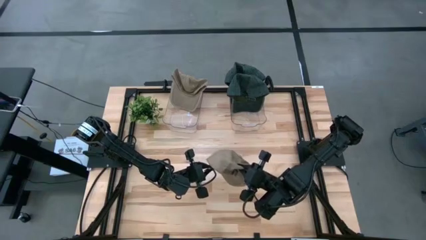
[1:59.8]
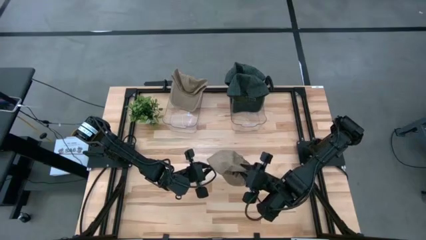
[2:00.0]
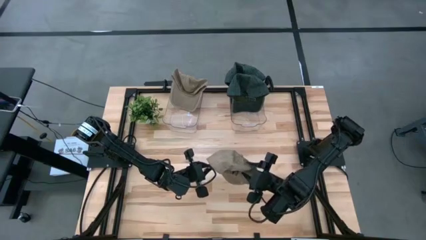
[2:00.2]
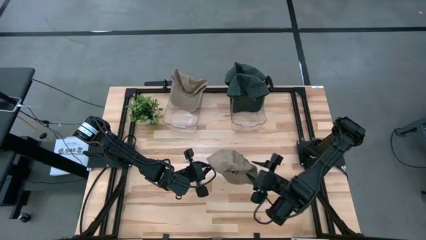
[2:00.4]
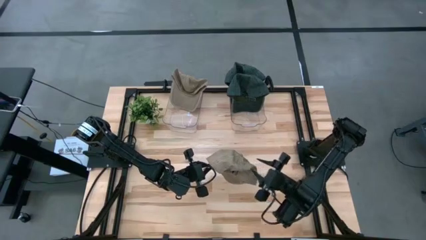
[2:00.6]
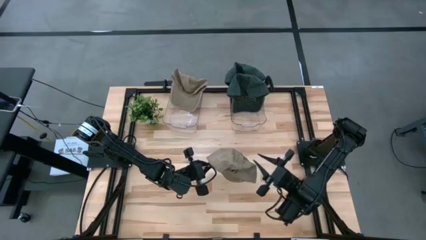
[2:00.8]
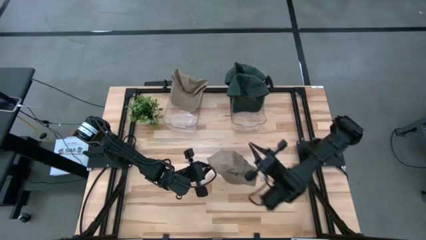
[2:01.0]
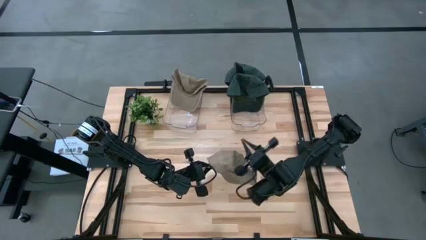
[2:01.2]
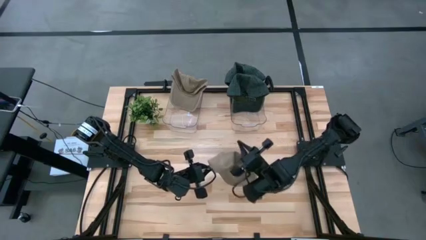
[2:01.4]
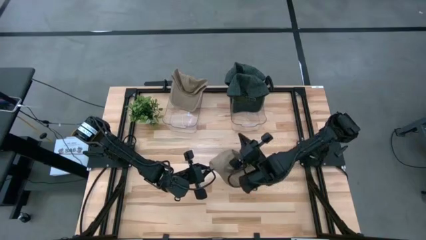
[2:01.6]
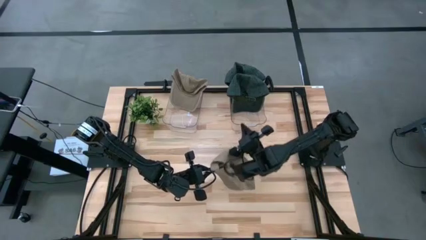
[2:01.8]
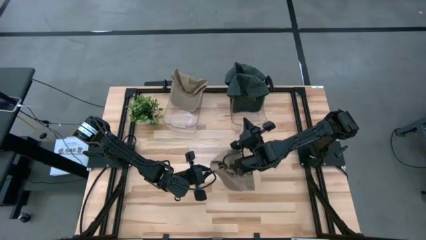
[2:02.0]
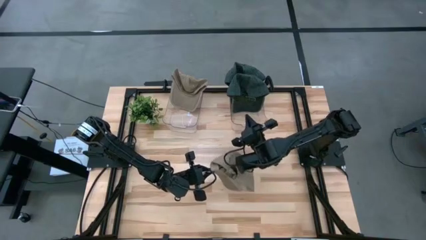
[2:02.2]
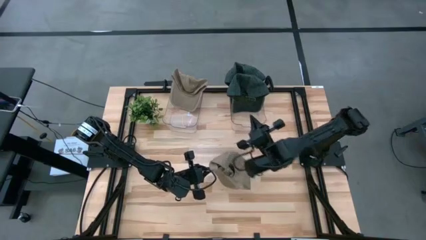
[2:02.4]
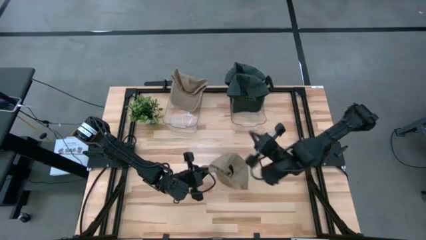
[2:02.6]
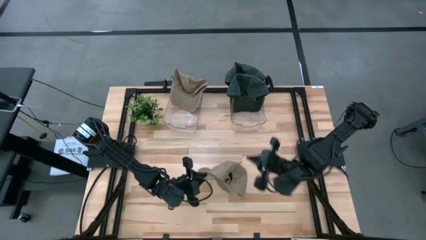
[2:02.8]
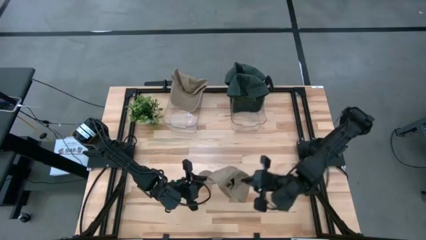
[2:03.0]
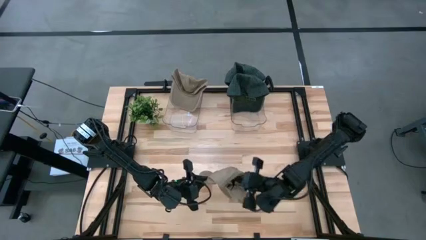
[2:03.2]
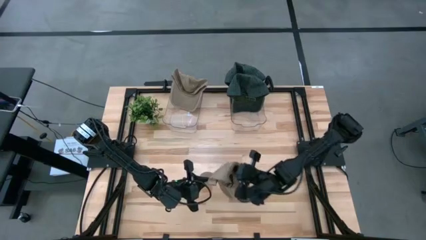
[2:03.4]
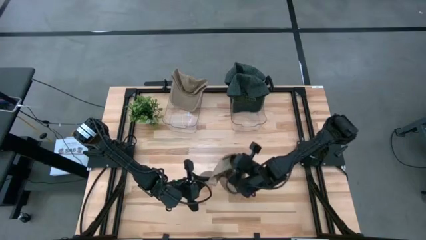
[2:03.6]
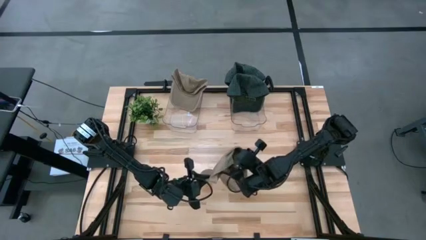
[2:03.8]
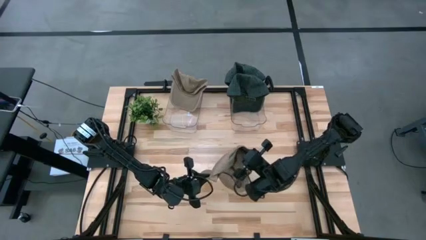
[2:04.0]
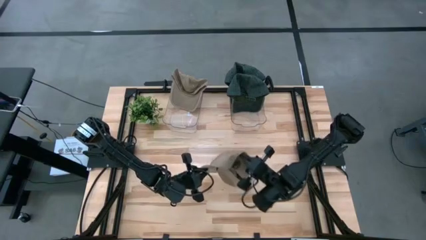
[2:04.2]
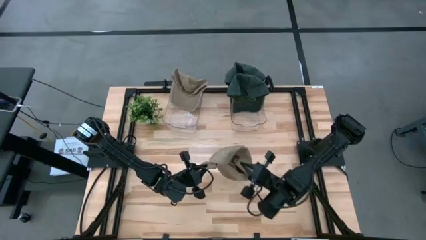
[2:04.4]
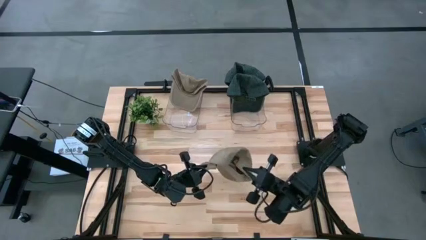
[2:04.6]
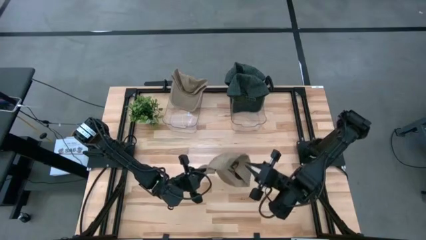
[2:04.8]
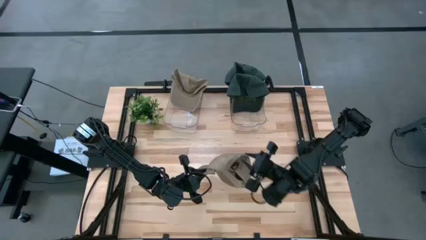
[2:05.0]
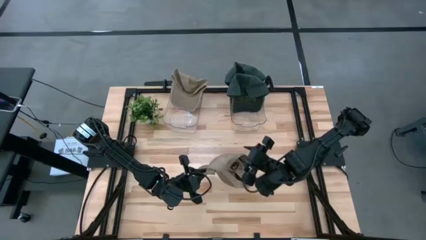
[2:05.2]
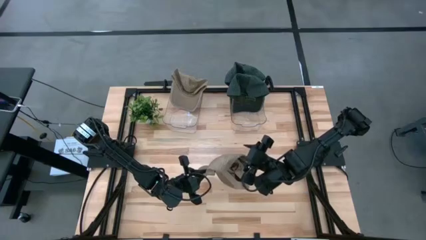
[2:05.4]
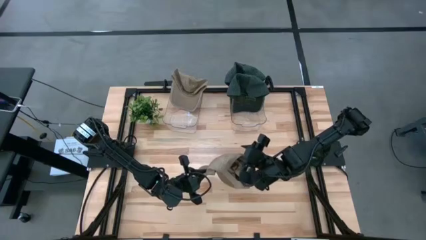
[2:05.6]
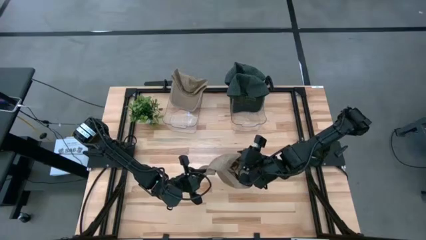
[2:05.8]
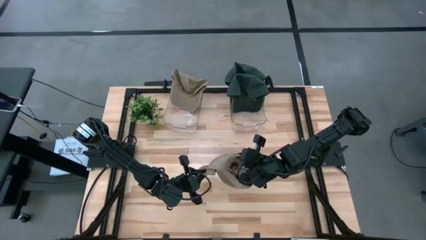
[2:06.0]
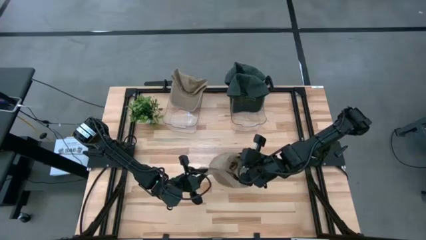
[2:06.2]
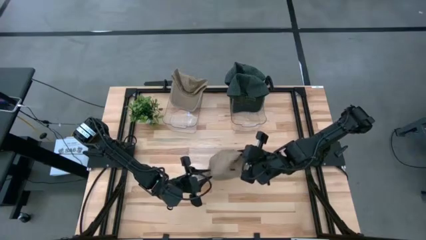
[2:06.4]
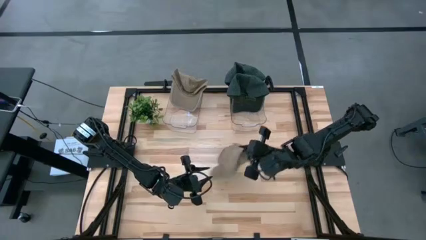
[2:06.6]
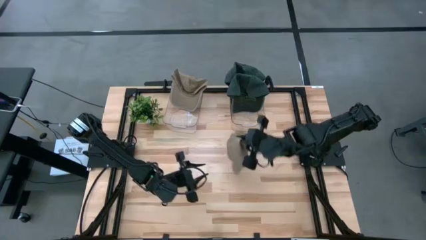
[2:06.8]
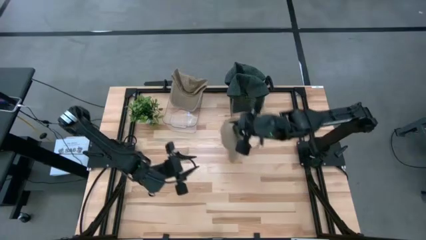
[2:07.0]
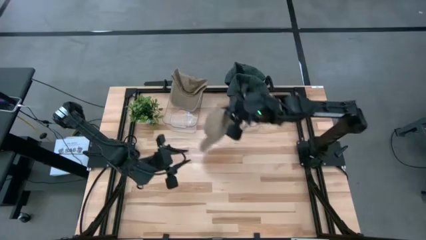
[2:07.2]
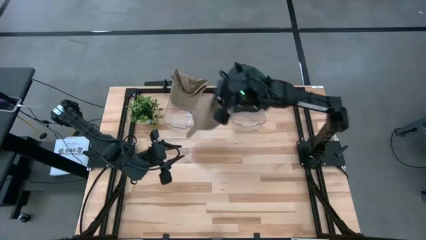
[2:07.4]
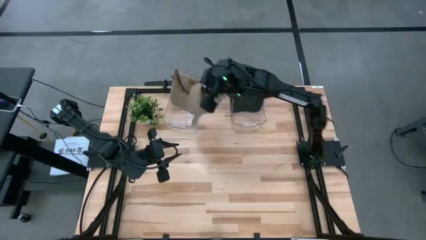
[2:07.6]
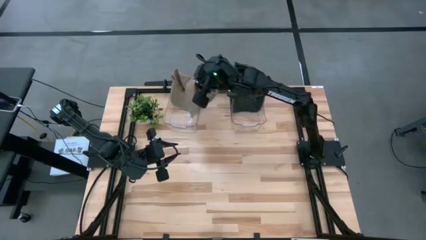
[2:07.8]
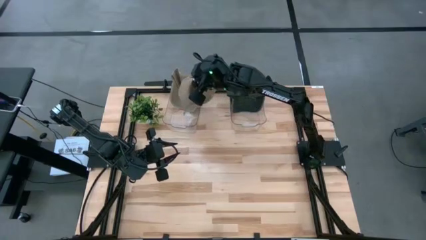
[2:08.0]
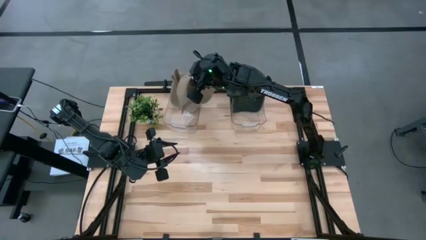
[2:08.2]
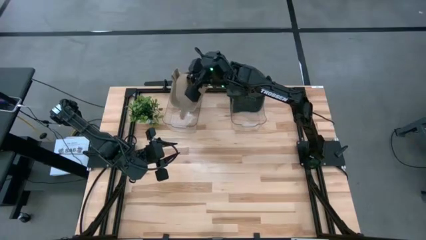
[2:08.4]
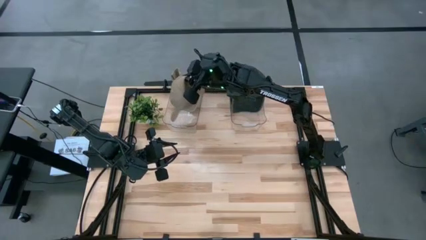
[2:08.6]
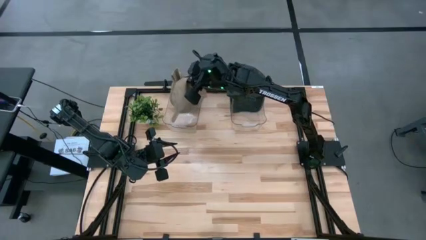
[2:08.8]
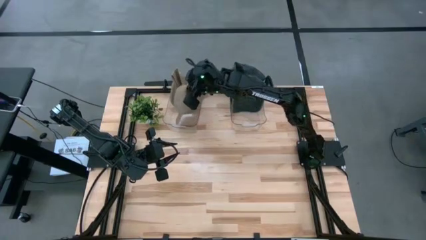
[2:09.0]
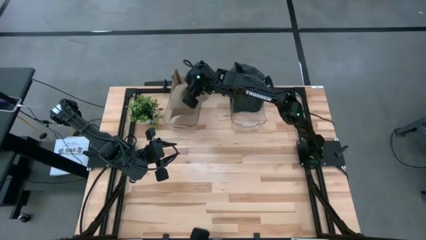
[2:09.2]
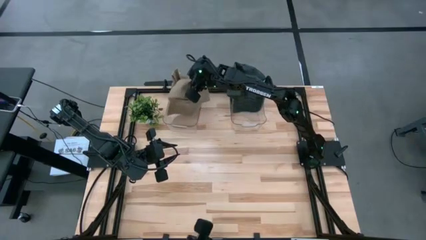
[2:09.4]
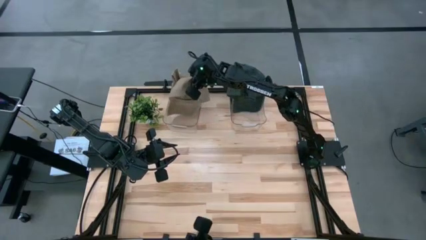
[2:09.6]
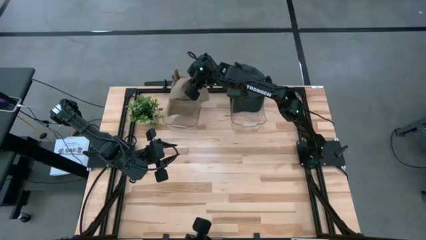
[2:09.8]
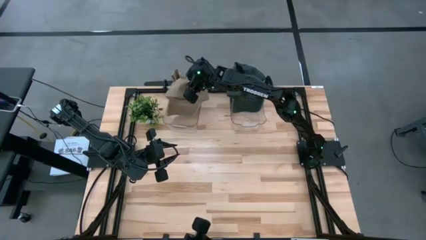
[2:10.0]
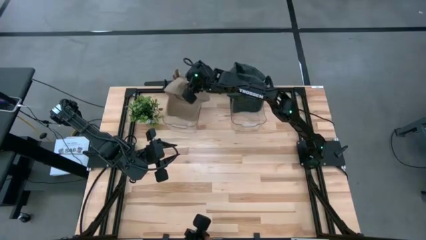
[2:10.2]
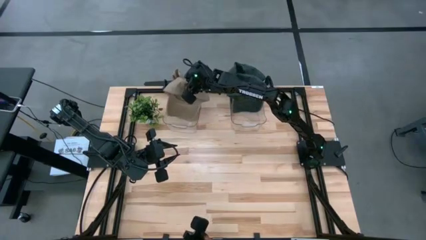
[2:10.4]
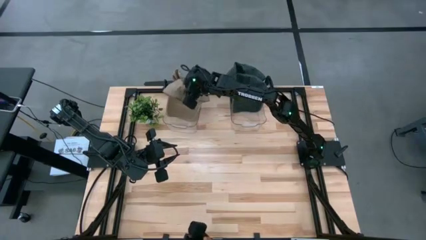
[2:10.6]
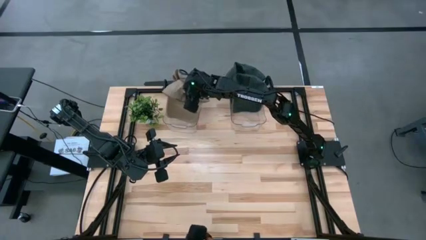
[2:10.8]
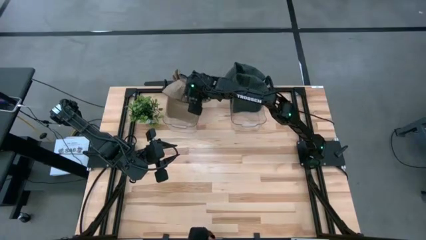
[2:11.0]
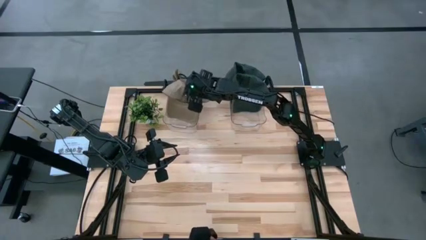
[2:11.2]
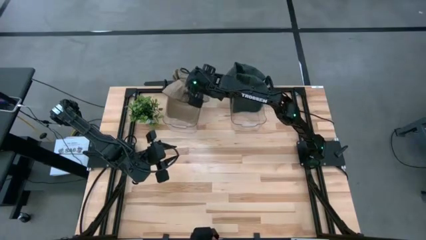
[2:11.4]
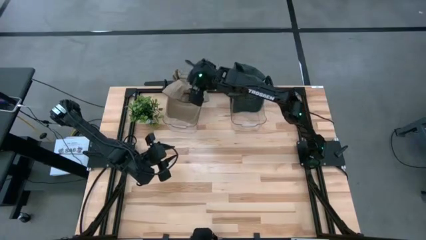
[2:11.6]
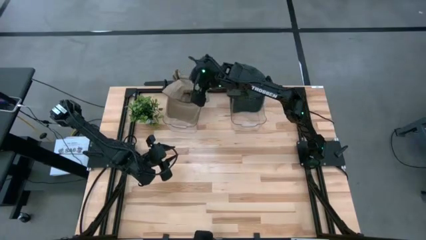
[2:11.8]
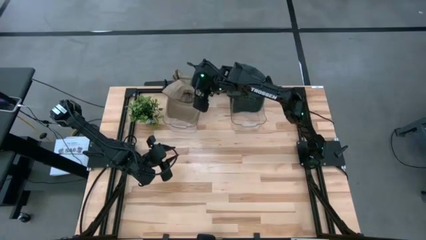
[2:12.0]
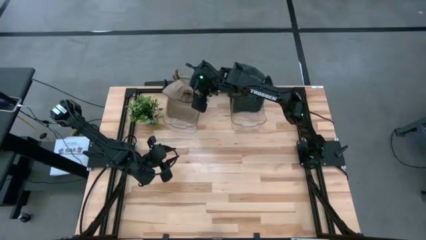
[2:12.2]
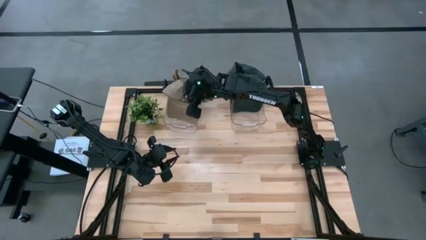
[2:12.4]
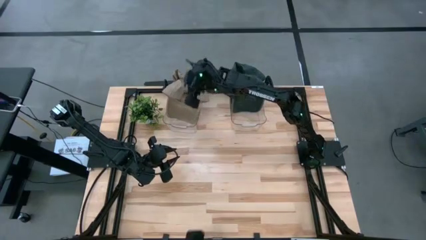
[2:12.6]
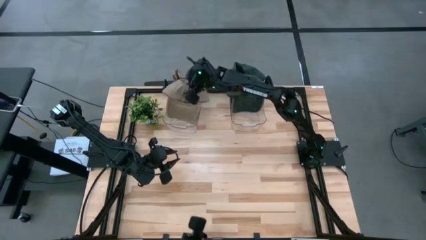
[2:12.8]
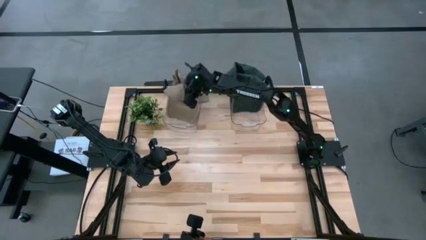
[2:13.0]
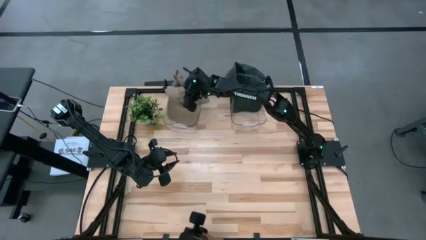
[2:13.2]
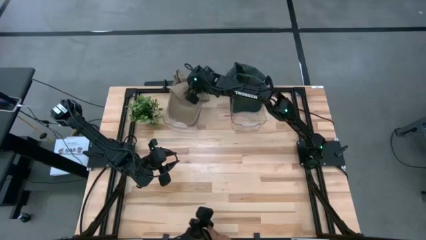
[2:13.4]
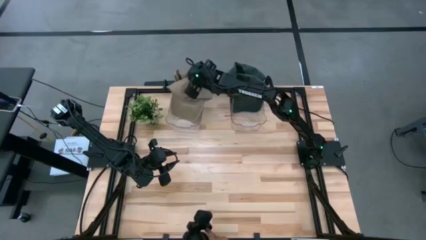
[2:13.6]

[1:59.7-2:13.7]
Task: Pick & Place hat
Put the brown cap into the left transparent bin
